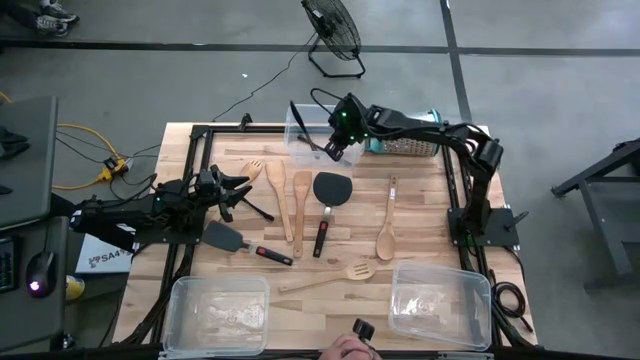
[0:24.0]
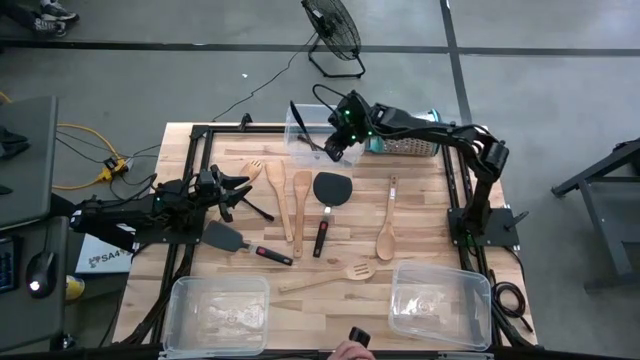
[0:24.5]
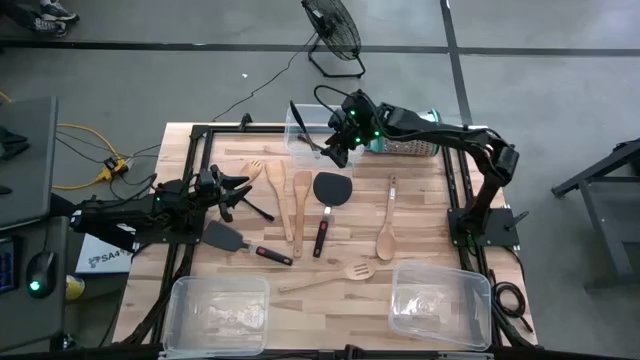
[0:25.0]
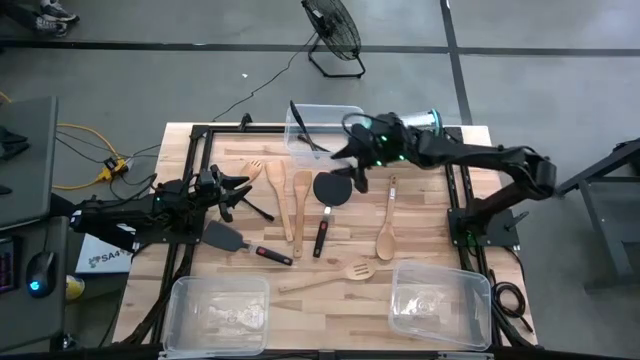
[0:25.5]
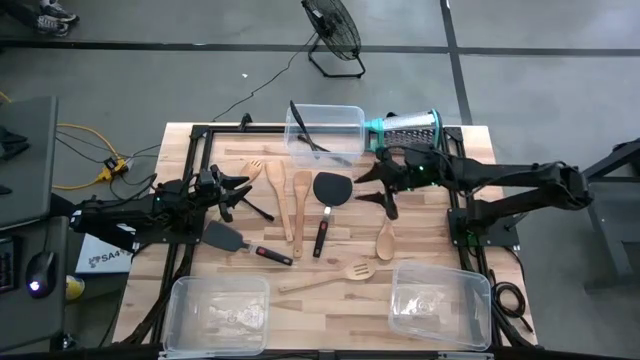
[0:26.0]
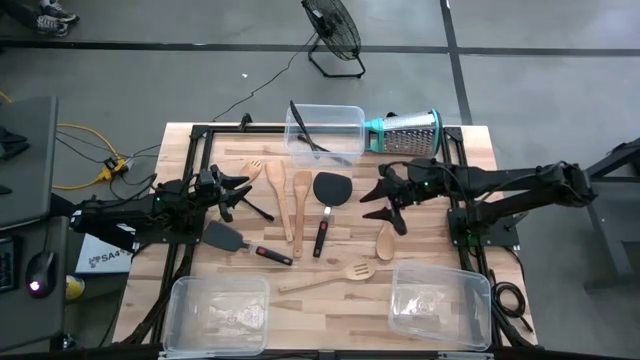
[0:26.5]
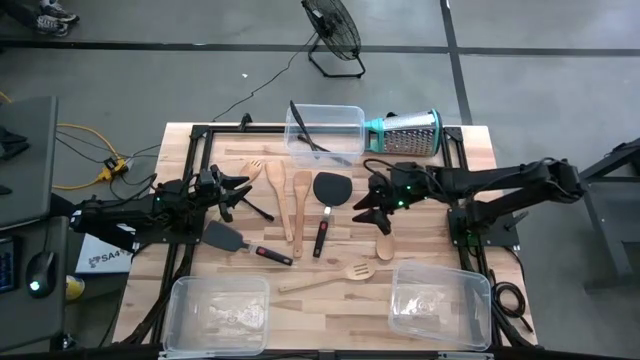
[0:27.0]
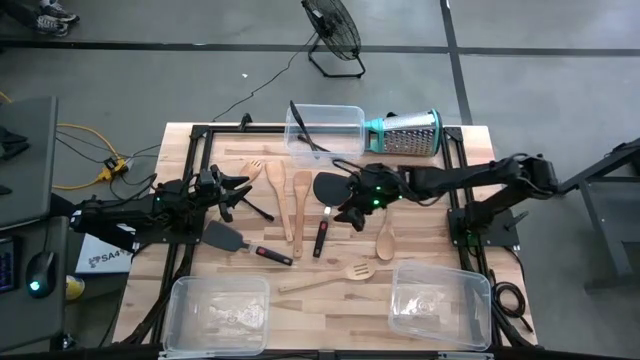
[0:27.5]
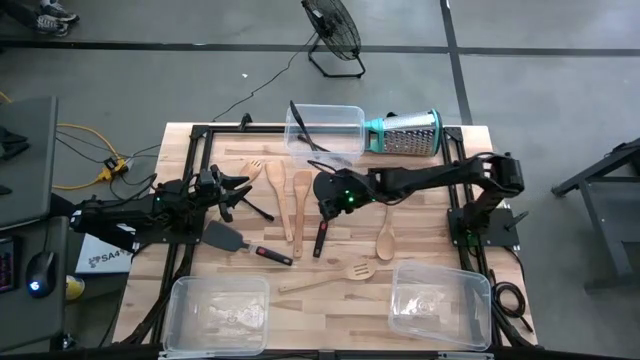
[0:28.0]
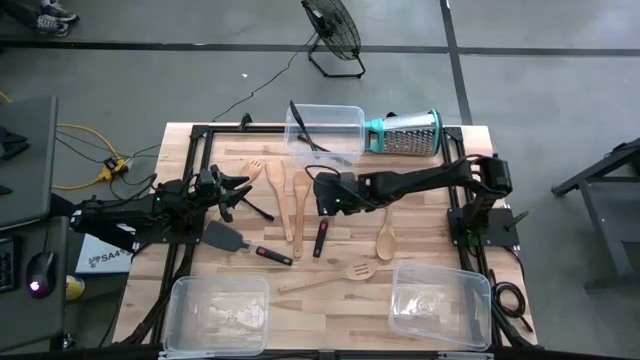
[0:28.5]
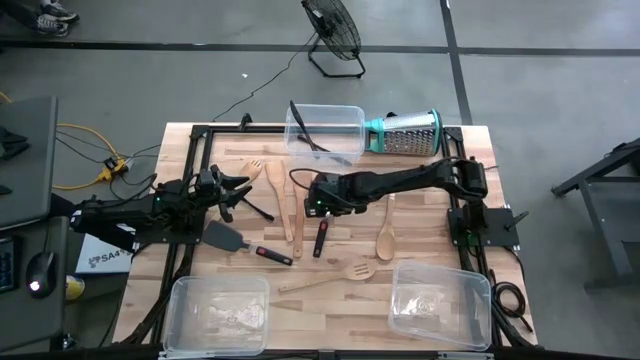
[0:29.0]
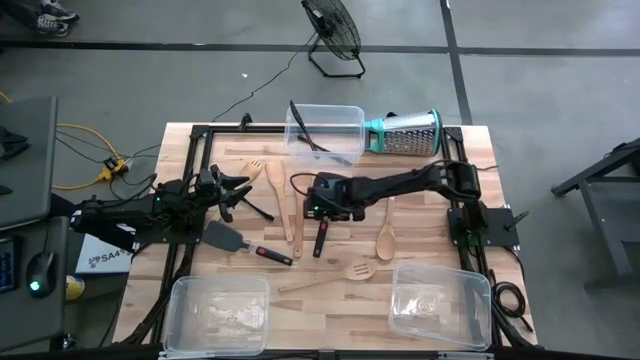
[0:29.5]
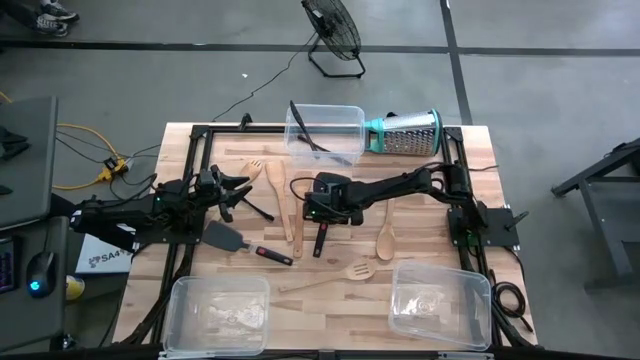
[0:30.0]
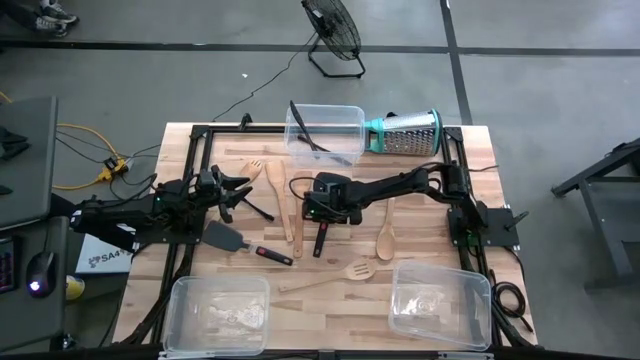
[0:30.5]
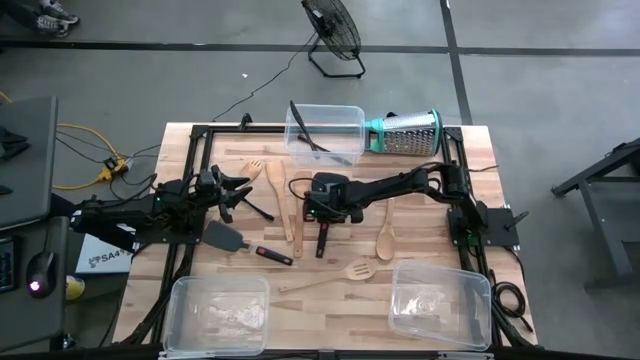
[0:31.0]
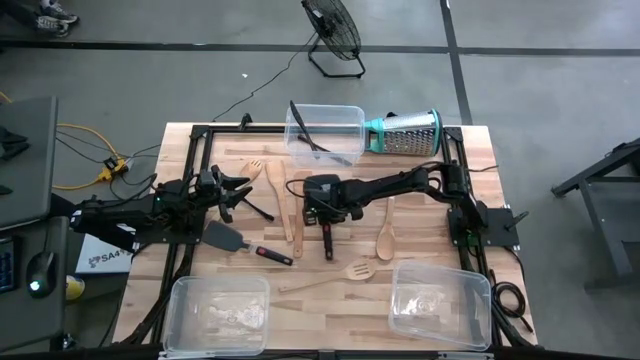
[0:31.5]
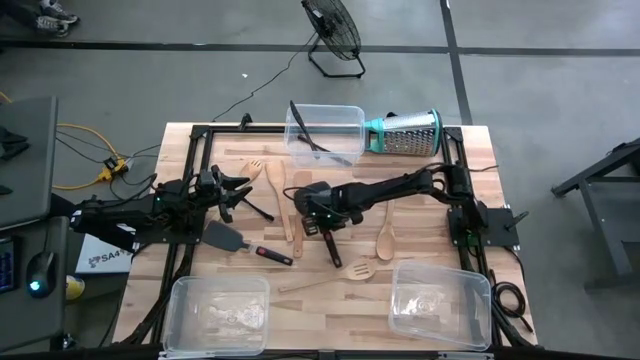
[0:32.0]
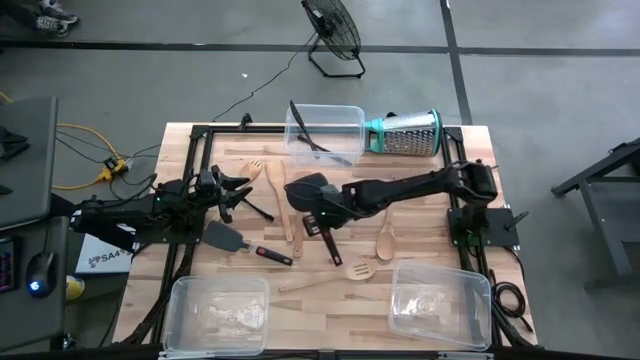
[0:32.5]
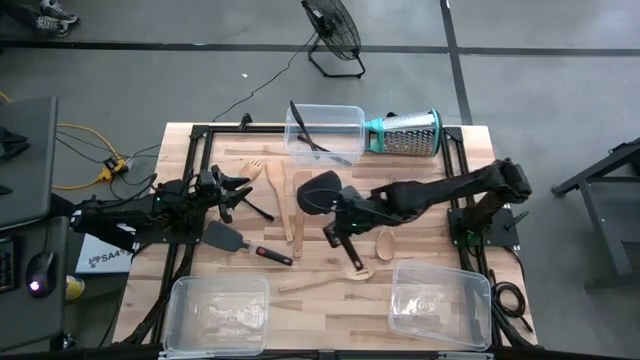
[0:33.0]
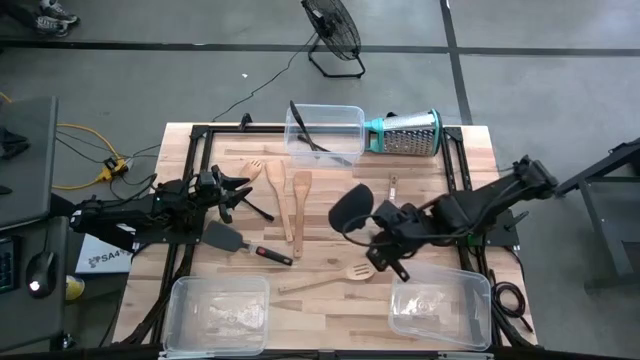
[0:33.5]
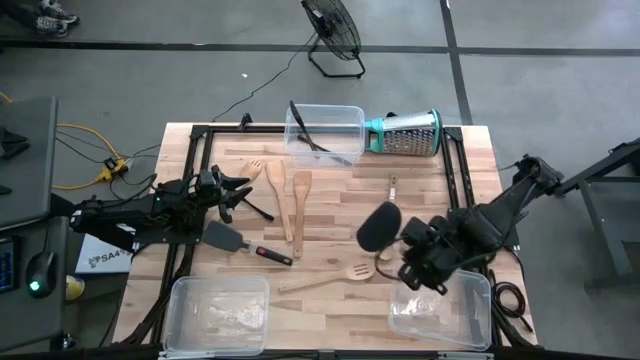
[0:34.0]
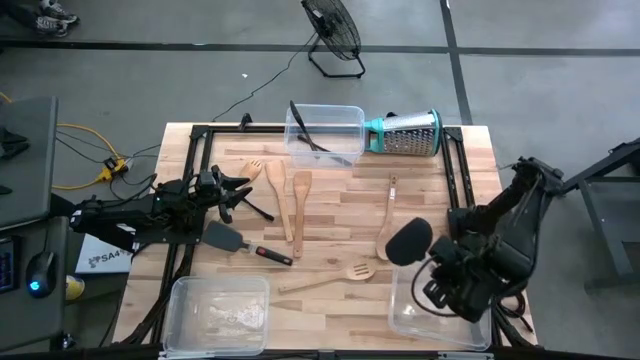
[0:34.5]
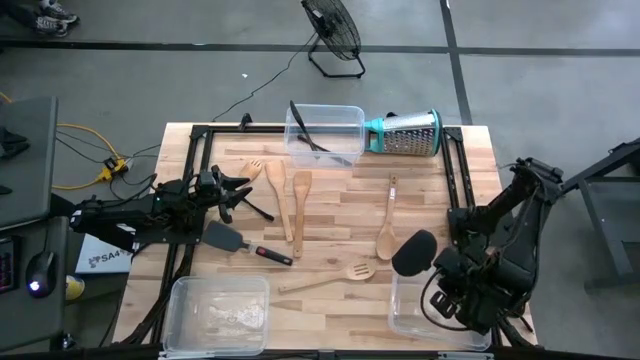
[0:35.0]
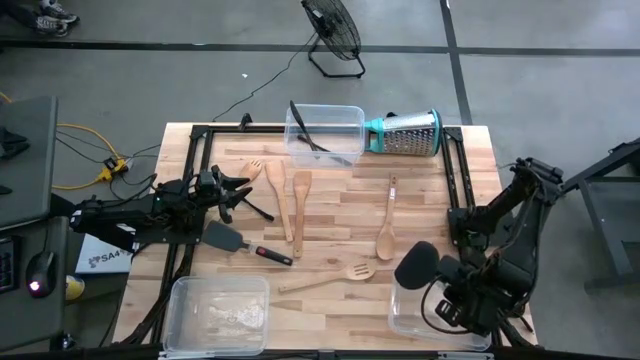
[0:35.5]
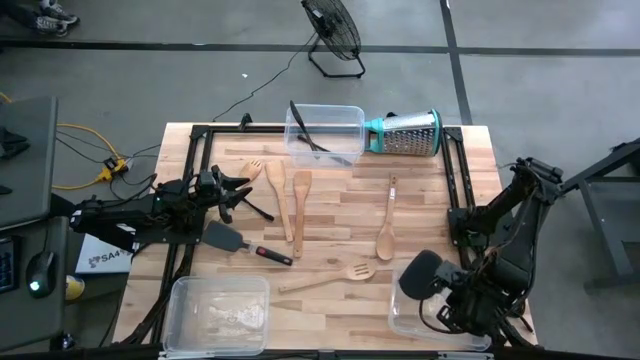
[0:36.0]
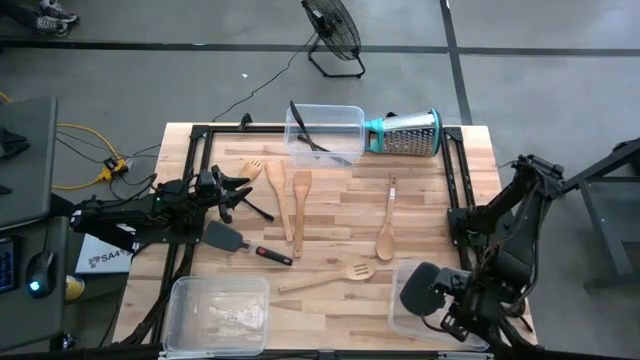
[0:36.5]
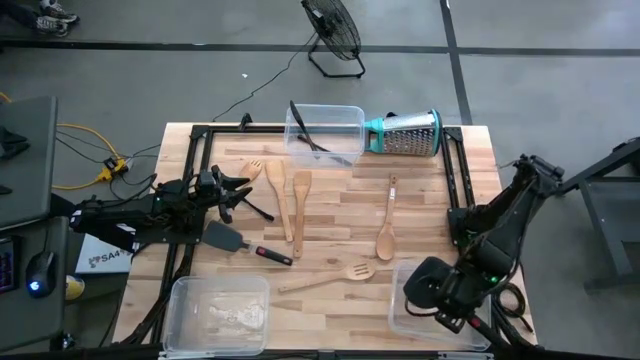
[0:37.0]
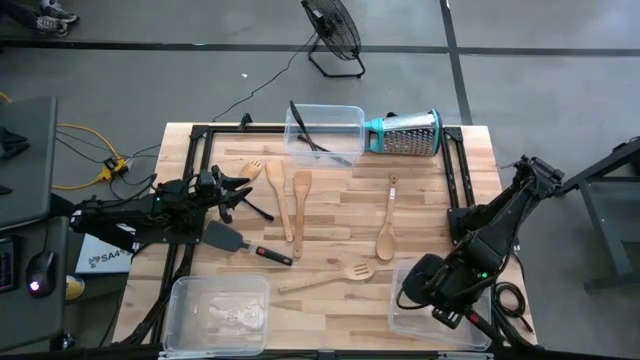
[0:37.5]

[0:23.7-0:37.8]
Task: Pick & Place Kitchen Items
Put the black spatula into the bottom right transparent bin

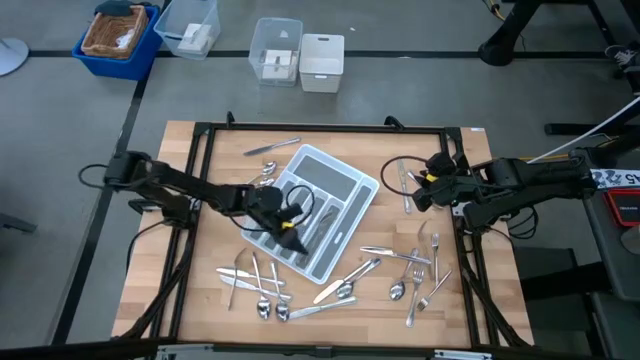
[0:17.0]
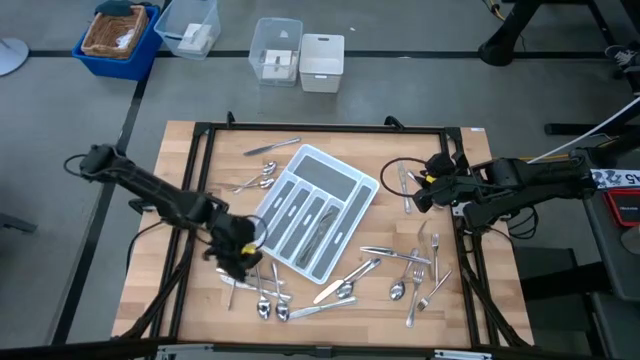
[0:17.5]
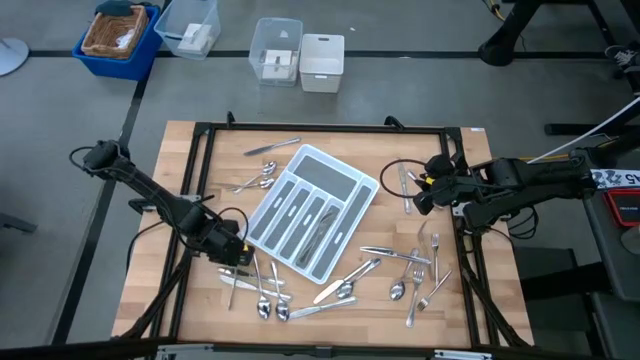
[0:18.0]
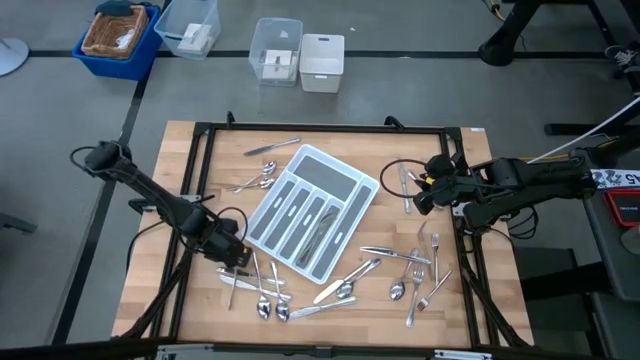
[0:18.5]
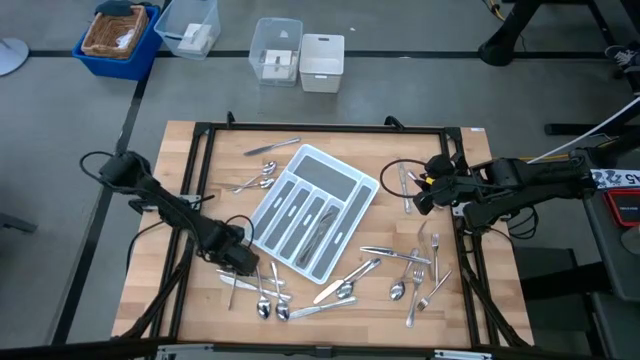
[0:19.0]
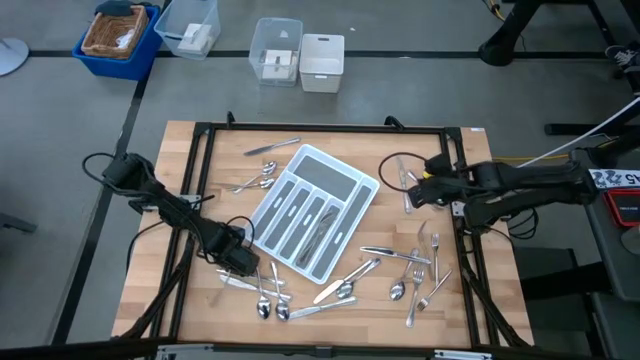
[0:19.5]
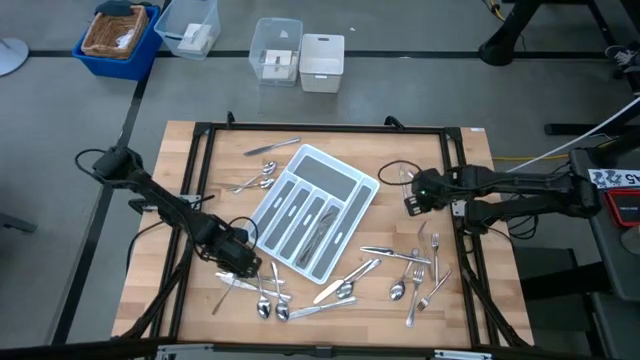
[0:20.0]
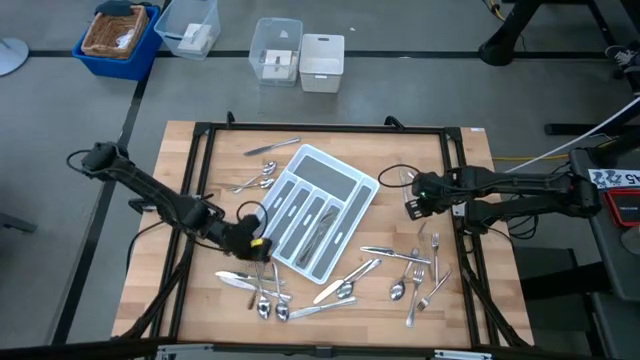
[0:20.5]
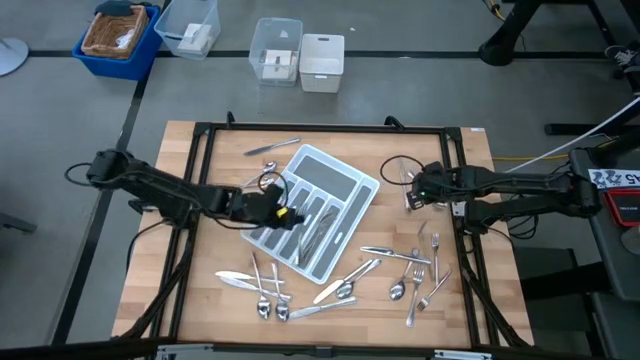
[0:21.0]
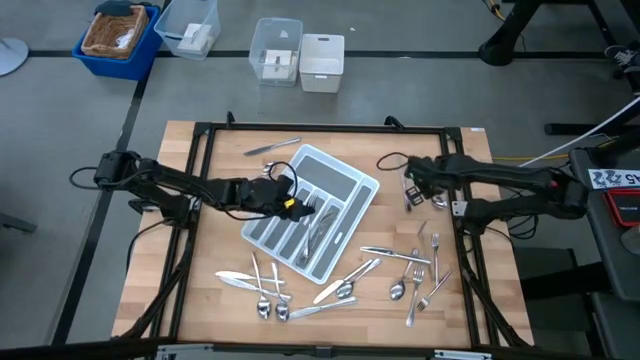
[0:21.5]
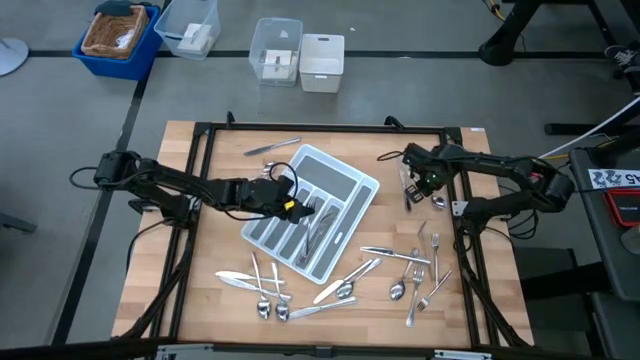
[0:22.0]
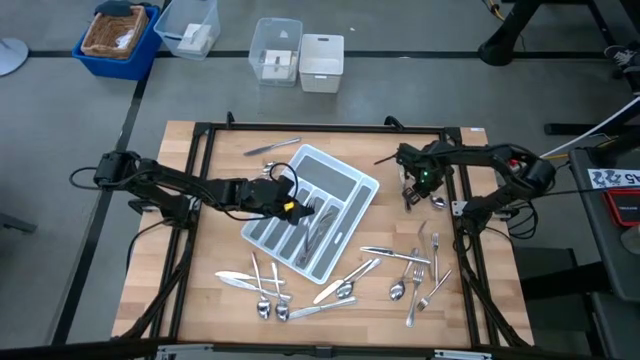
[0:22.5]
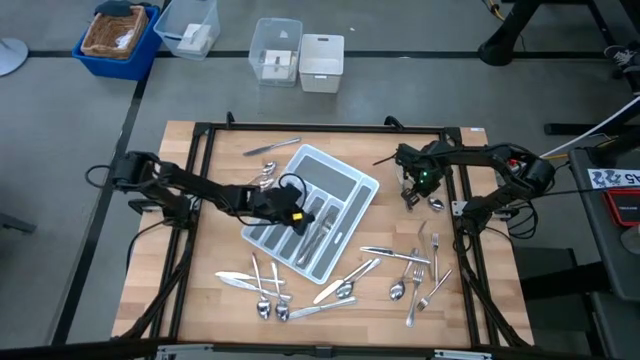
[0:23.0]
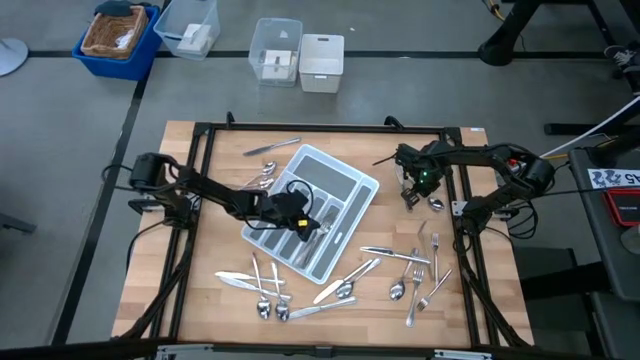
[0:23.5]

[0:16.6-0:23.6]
Task: Sort silverware
Put the silver fork into the white cutlery tray
